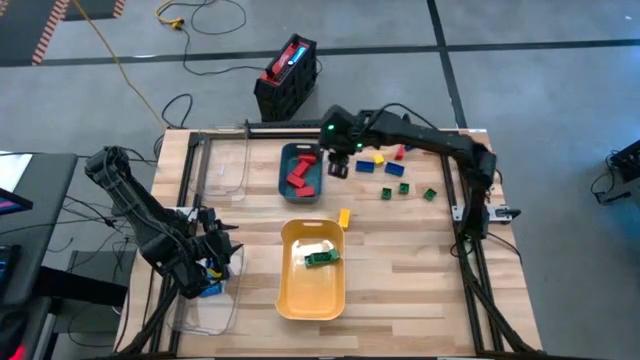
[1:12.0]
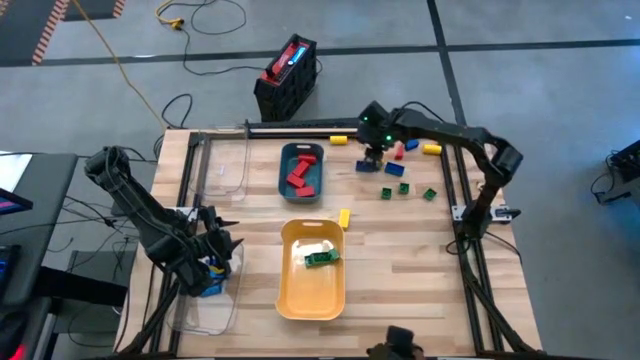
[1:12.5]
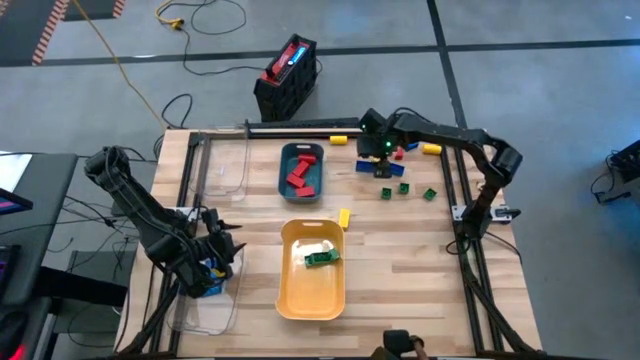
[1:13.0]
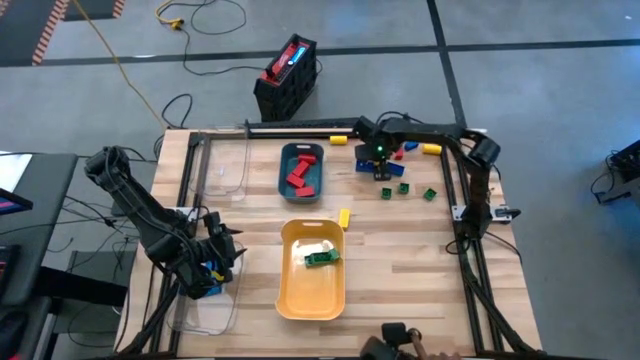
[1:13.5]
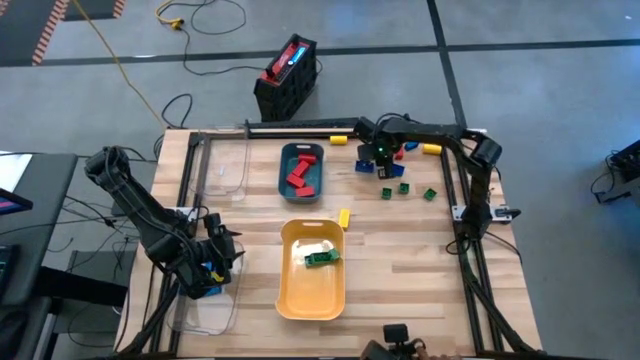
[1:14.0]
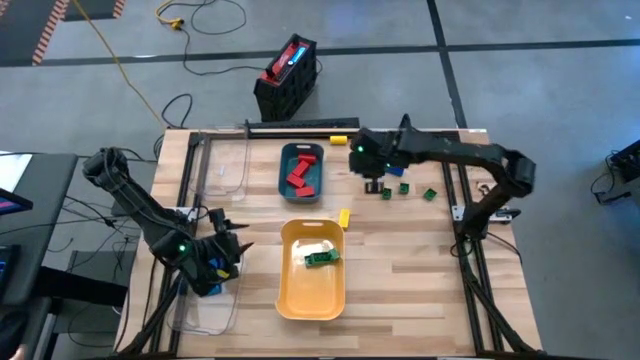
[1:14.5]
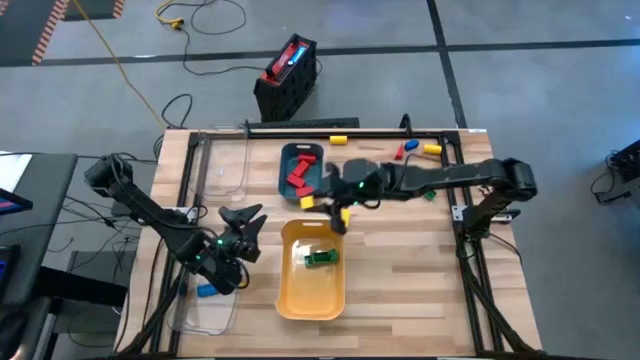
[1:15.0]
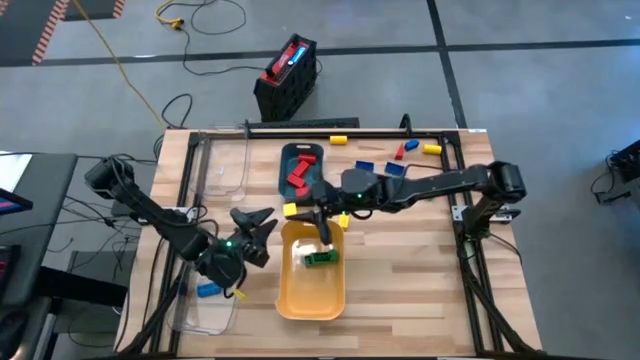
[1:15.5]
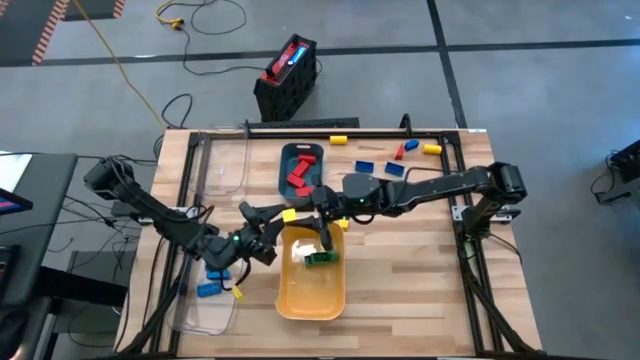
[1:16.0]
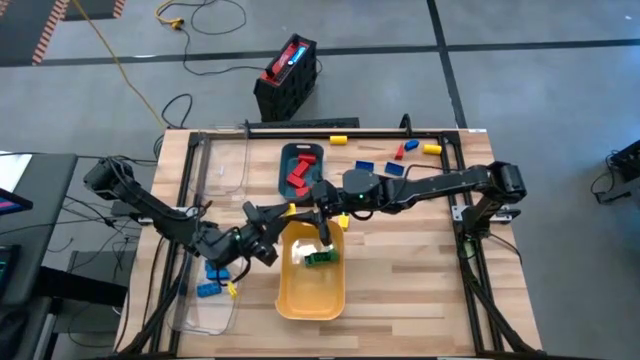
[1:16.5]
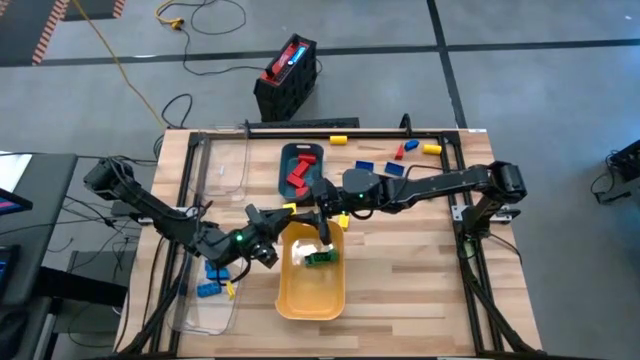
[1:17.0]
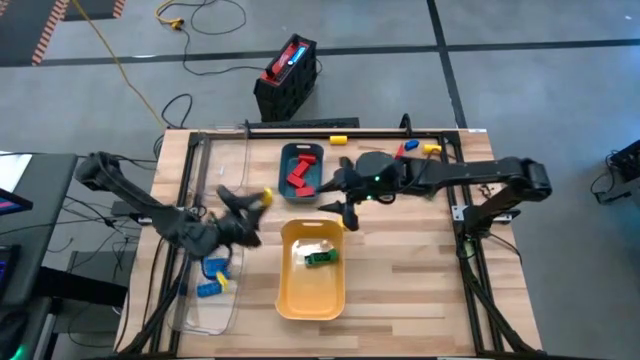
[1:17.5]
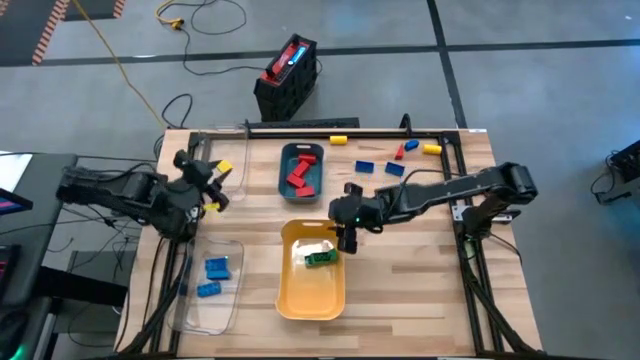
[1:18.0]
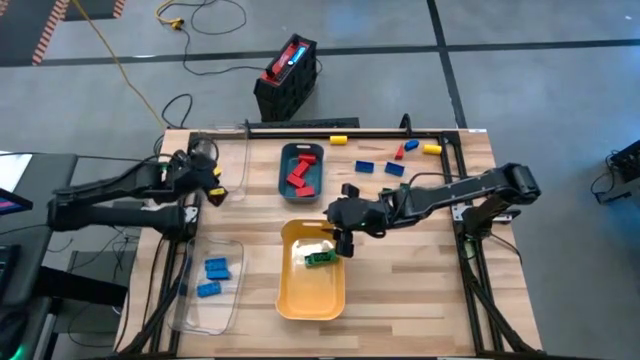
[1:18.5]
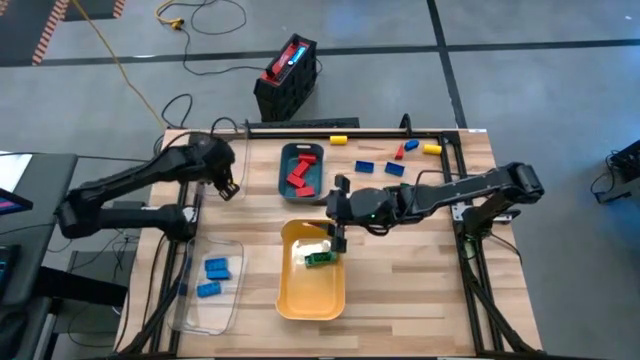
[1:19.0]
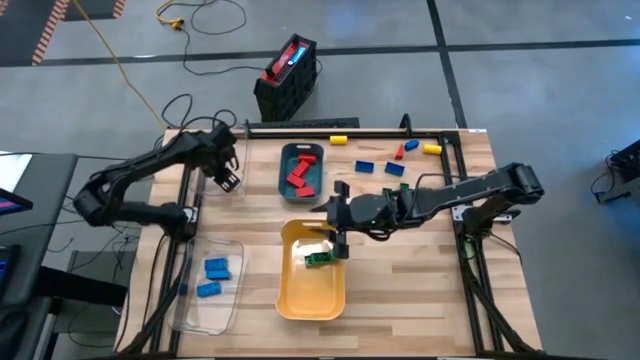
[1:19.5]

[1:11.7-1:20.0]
Task: Sort blocks
Put the square yellow wooden block into the top left transparent bin

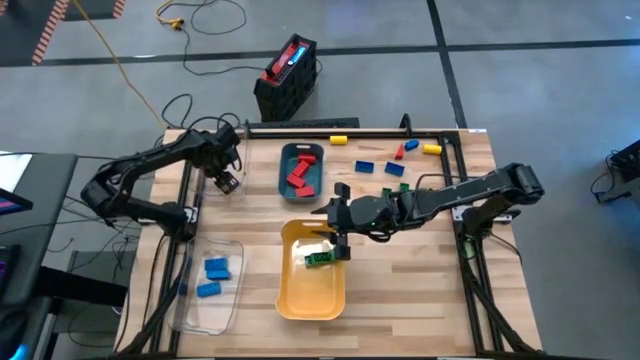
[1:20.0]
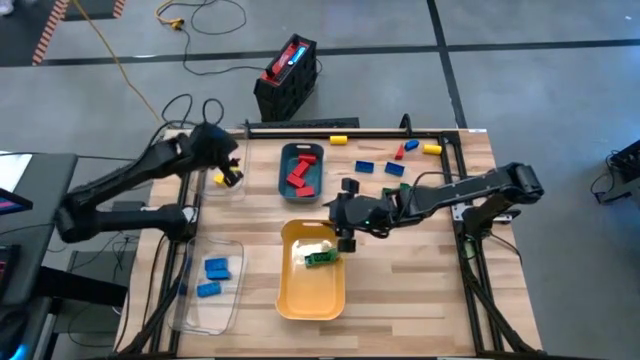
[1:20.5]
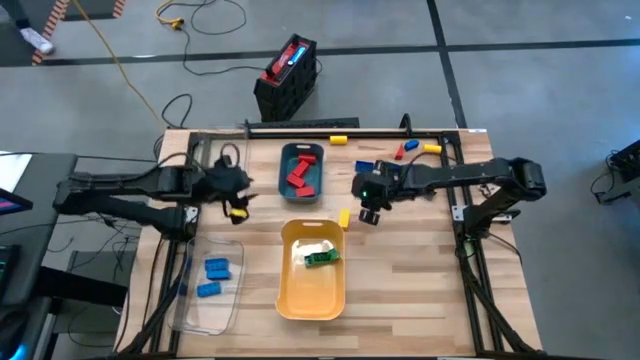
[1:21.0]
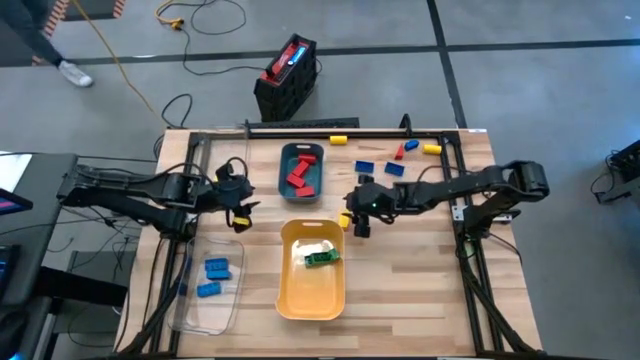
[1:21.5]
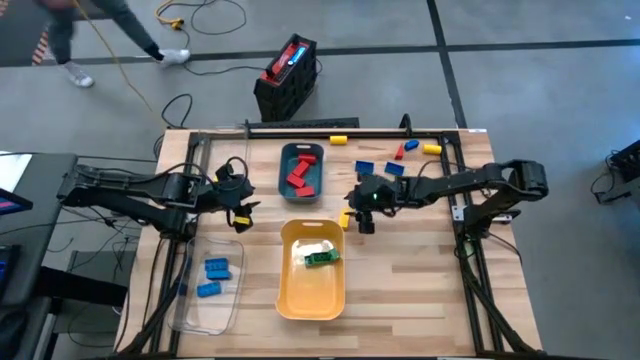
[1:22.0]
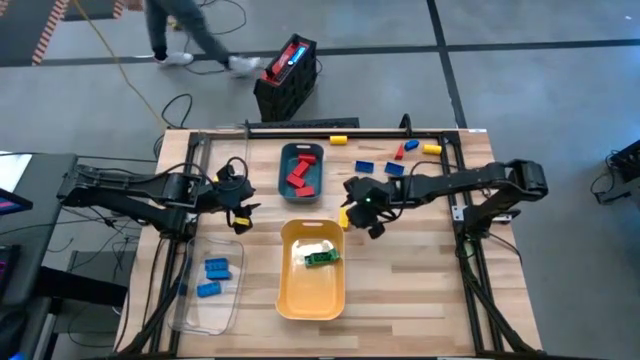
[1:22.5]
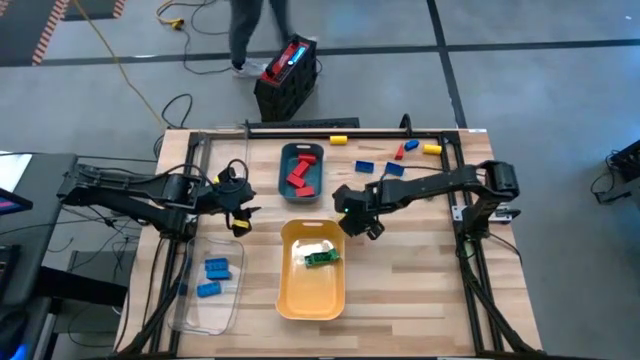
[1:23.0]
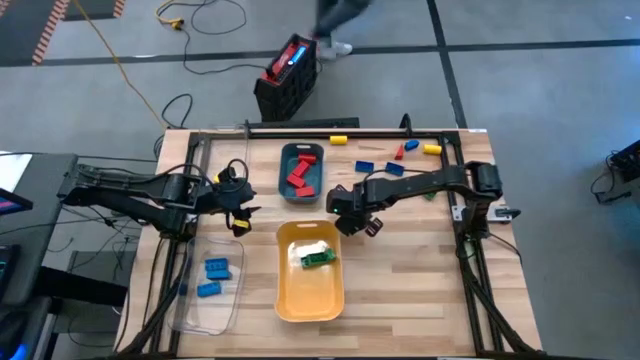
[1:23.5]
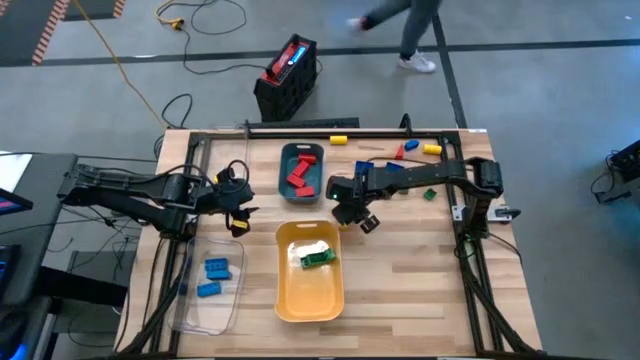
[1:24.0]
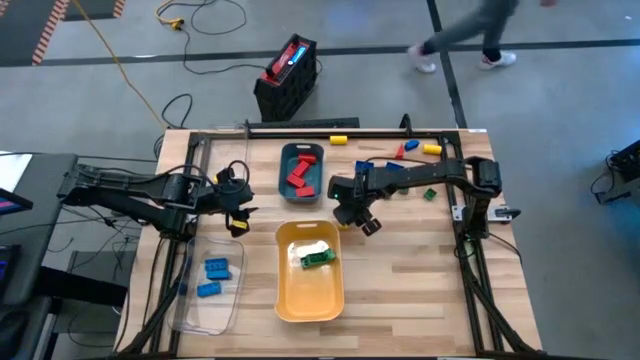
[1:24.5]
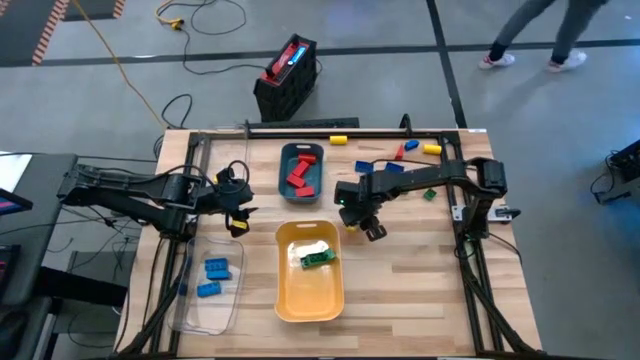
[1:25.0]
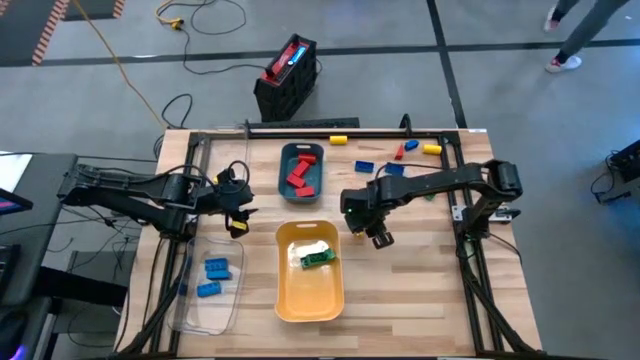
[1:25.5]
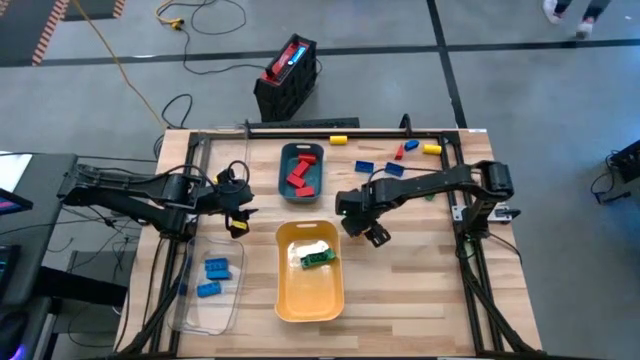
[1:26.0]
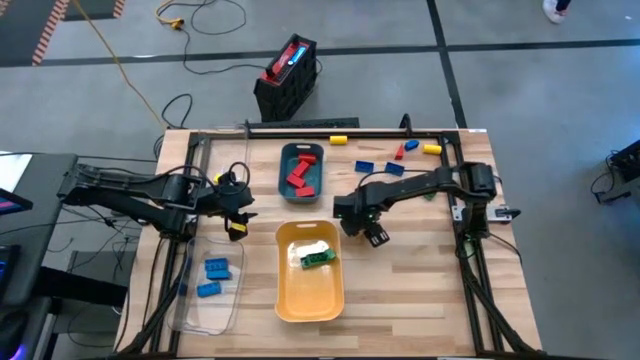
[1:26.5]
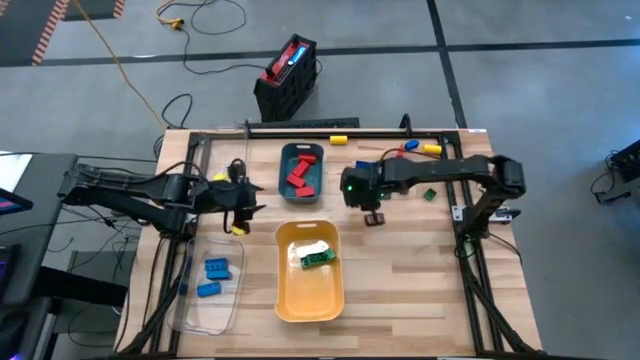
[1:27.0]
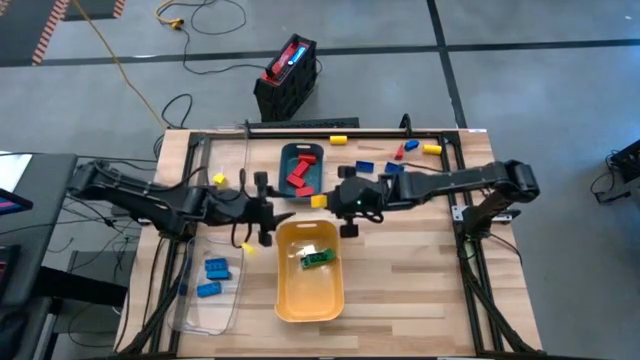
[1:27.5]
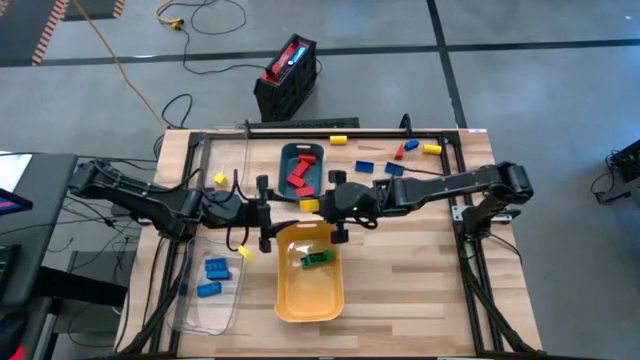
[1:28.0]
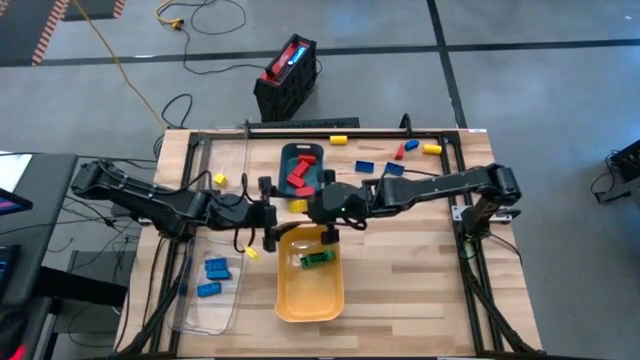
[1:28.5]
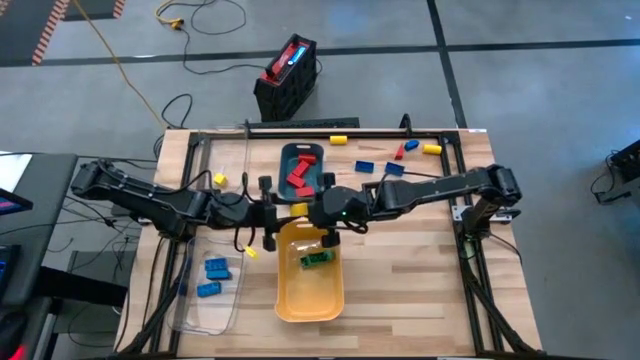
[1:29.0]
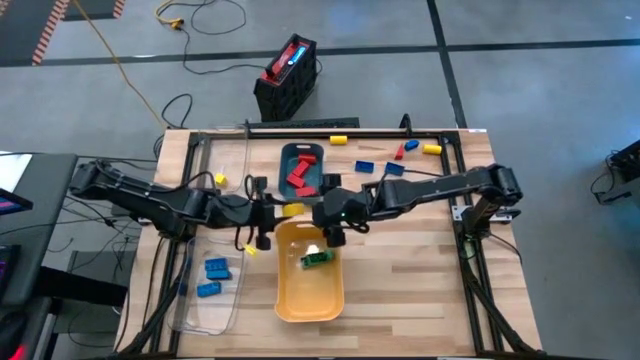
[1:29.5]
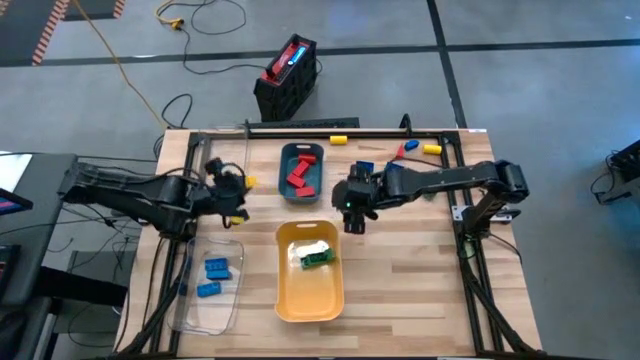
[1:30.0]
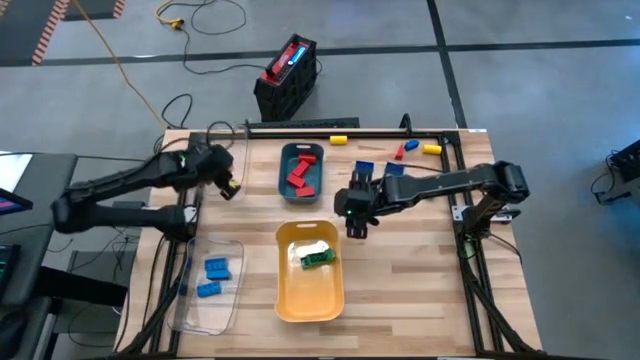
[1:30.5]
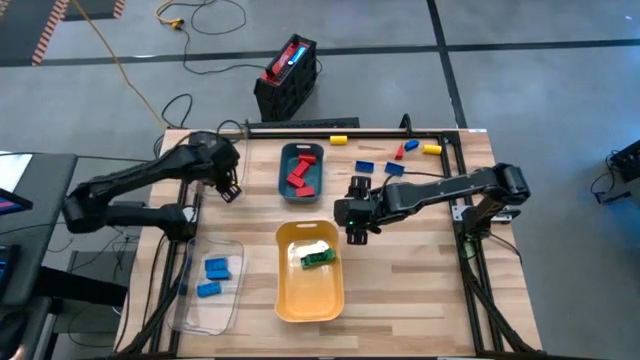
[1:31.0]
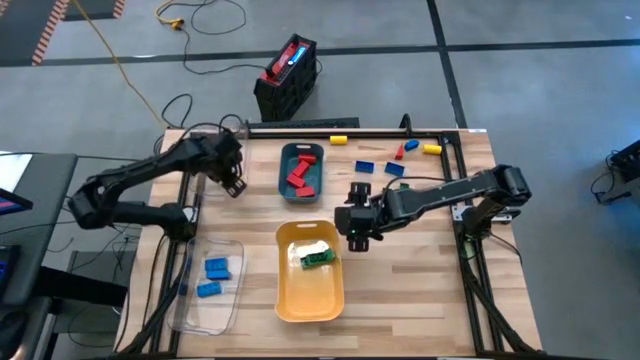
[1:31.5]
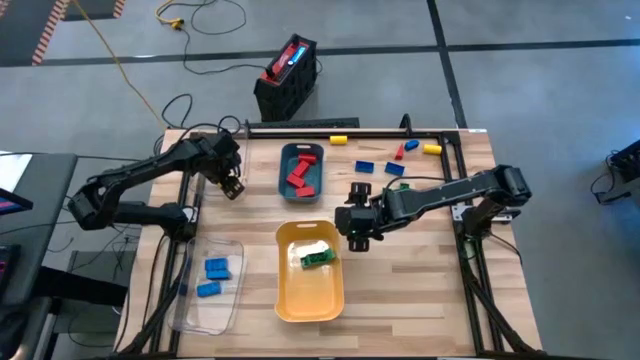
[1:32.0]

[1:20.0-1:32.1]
Put the rectangular yellow wooden block into the top left transparent bin
